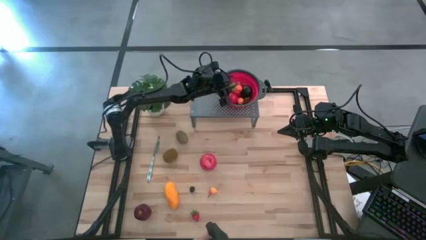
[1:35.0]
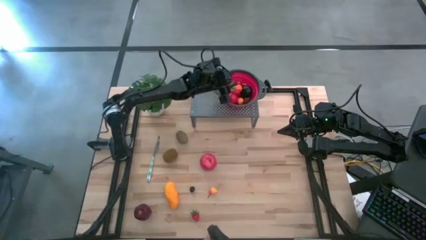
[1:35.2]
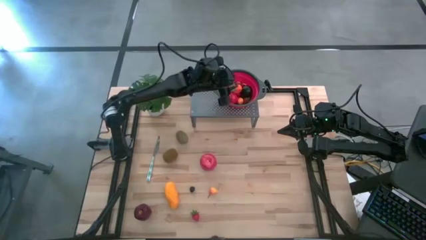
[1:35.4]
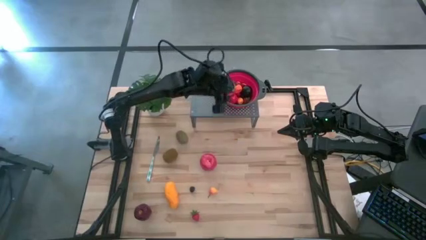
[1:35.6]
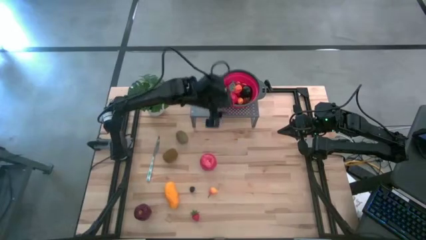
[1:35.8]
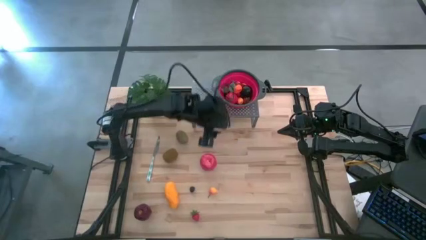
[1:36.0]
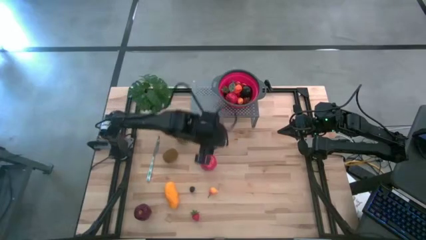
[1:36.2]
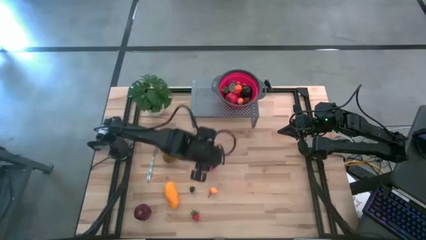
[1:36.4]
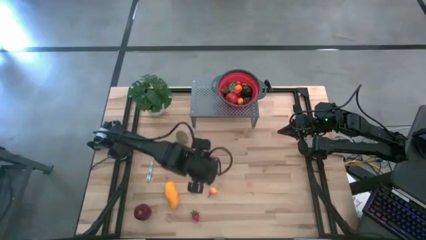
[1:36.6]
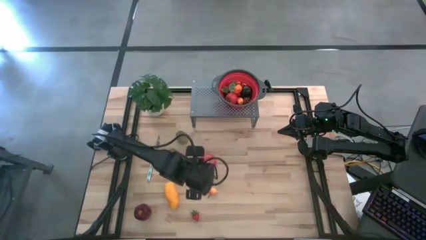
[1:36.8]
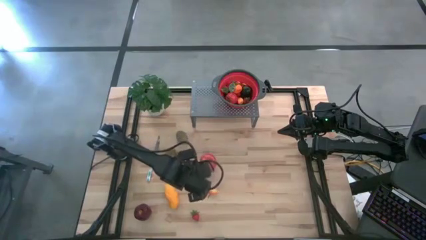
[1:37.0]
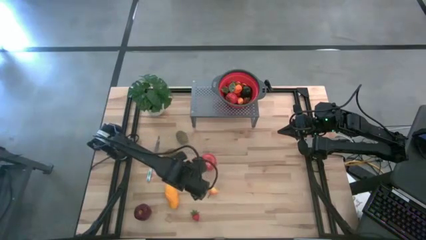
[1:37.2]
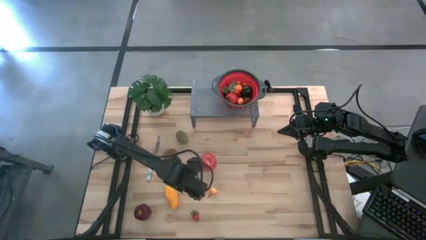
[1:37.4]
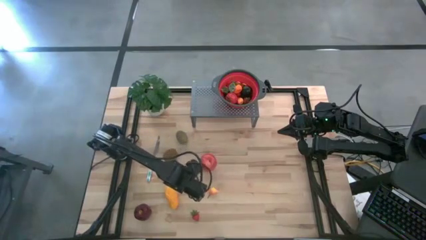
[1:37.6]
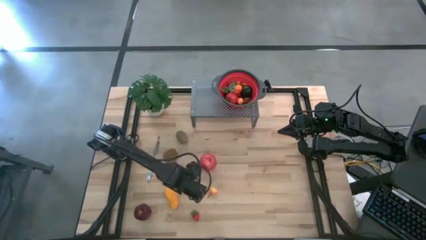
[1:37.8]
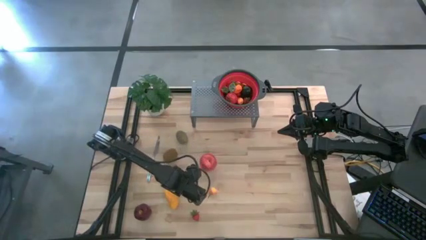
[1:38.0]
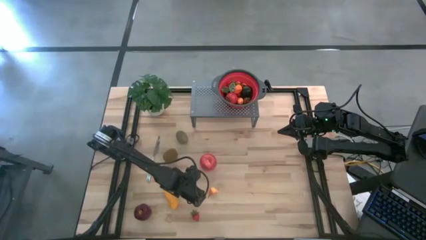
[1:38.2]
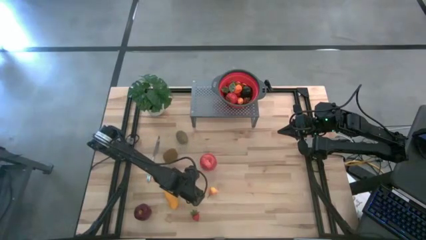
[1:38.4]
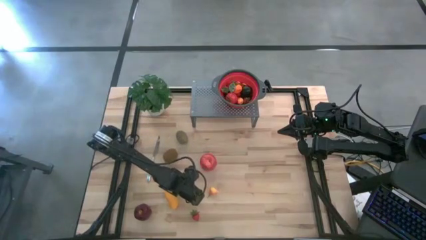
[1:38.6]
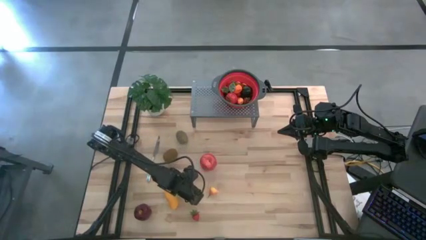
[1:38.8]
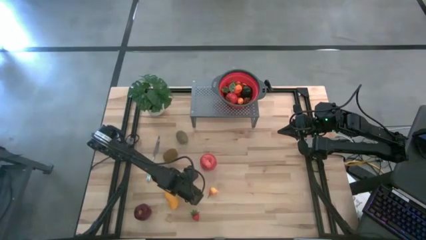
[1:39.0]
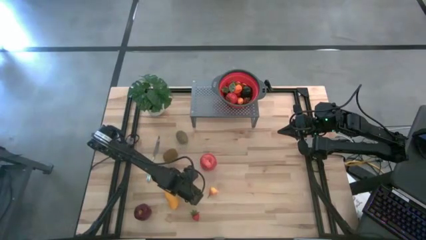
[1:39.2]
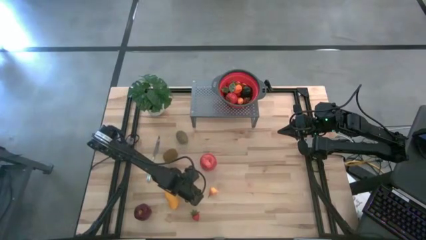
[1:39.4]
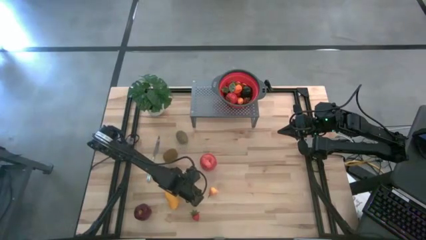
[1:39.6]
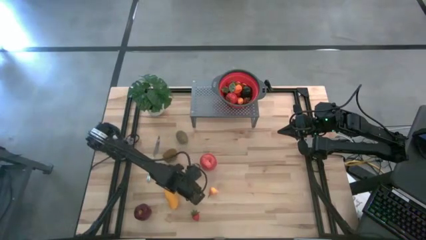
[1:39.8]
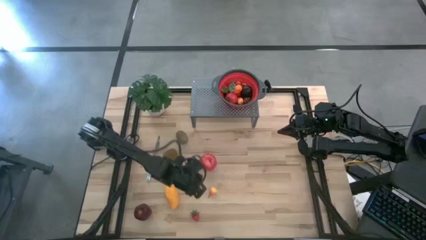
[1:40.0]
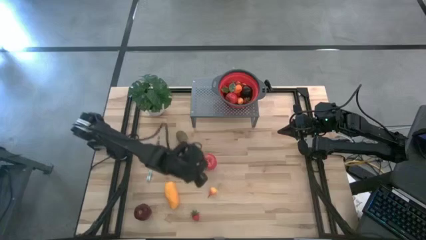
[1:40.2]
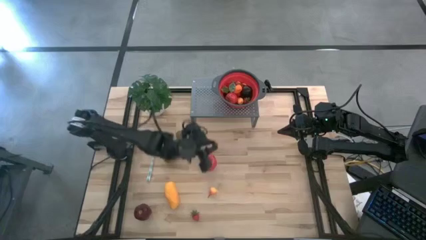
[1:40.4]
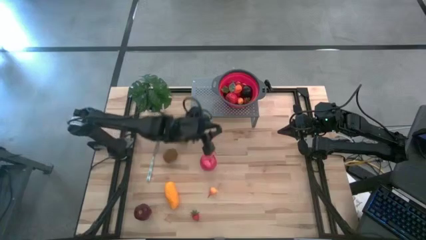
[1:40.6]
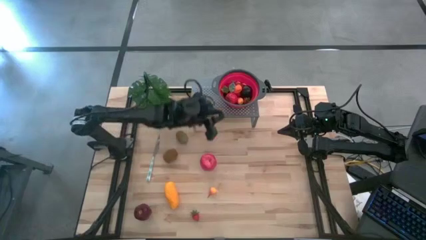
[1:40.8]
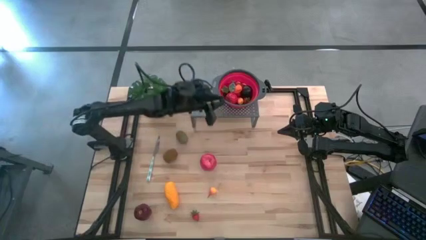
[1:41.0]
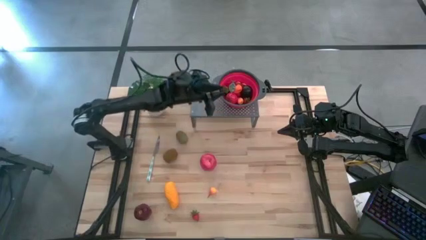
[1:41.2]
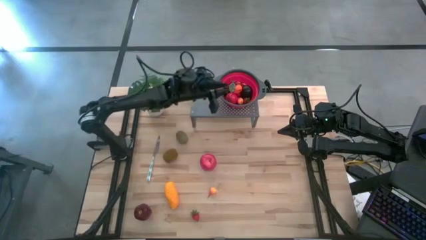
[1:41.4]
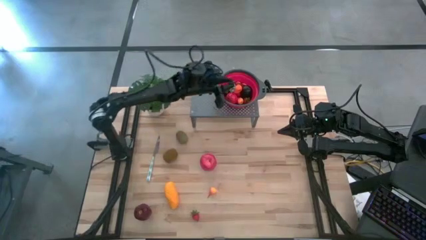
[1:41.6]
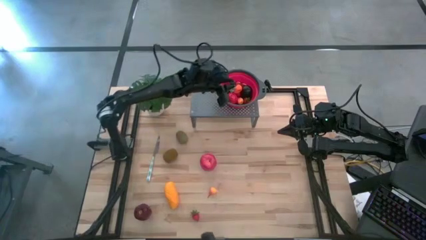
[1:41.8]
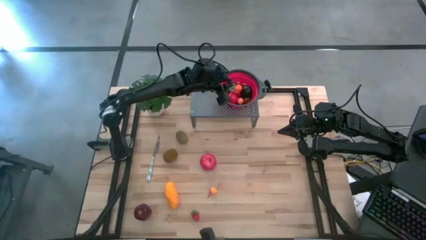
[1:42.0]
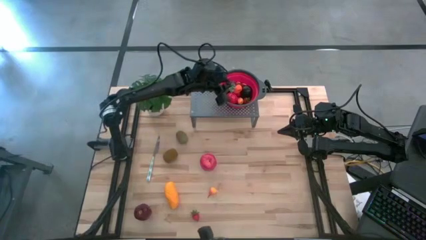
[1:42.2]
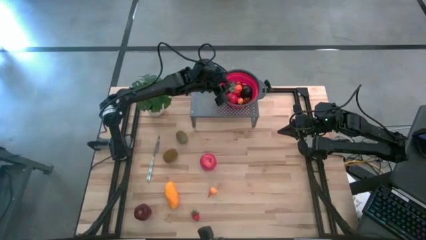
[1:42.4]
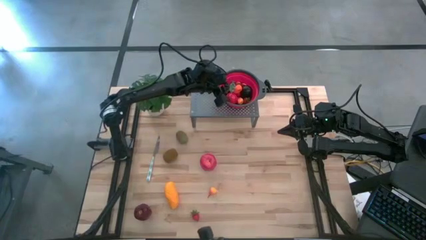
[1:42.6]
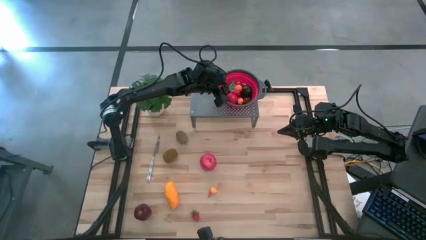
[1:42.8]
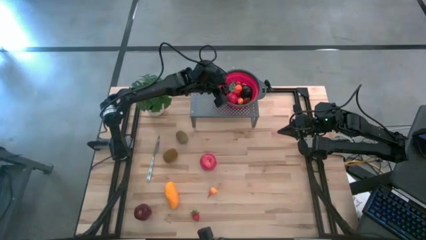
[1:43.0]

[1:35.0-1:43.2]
Task: Pick & Place Fruit
Put the black blackberry into the strainer bowl on the shelf

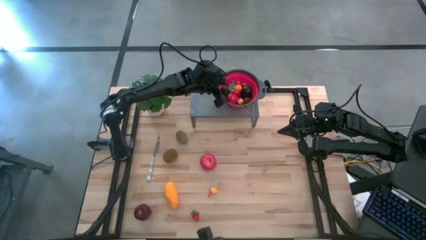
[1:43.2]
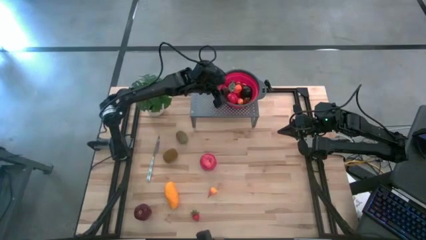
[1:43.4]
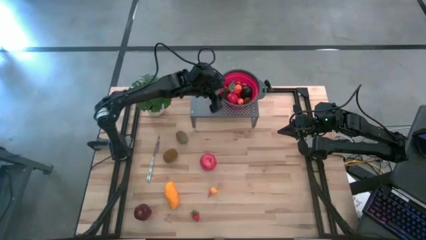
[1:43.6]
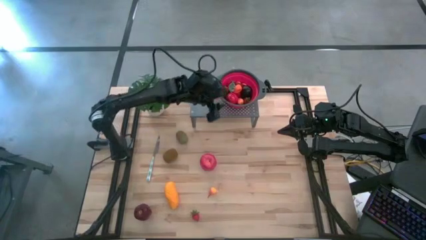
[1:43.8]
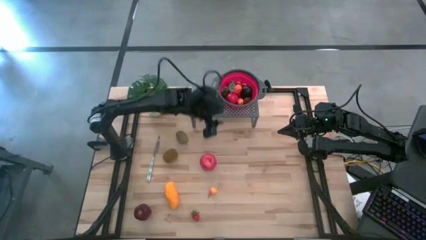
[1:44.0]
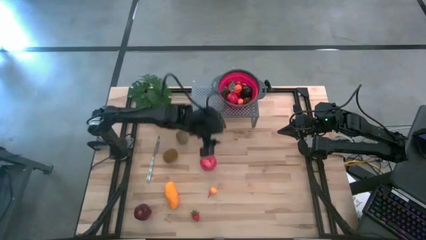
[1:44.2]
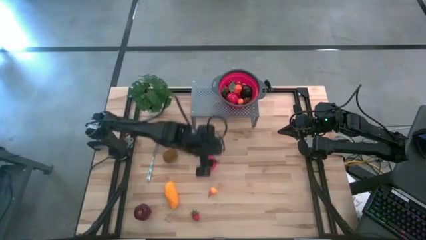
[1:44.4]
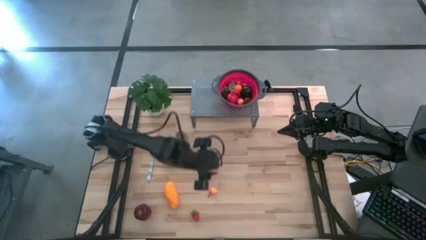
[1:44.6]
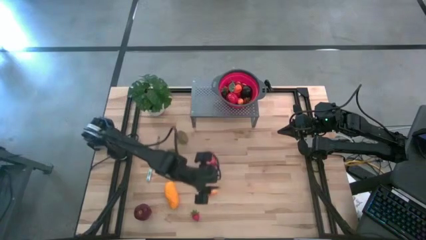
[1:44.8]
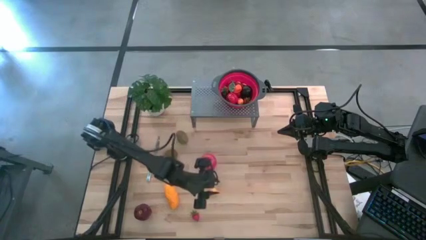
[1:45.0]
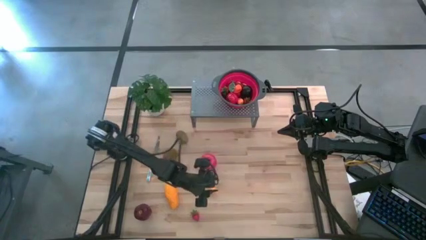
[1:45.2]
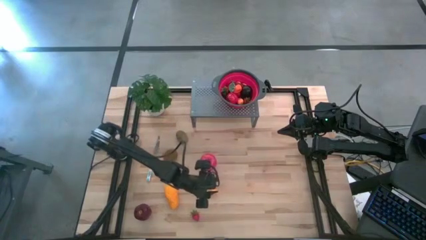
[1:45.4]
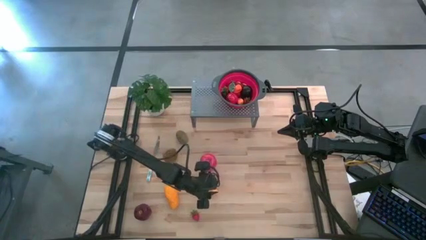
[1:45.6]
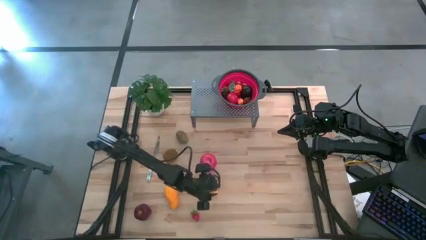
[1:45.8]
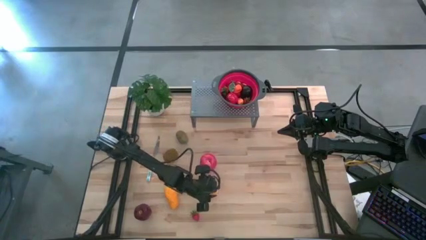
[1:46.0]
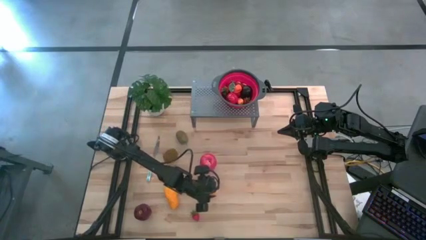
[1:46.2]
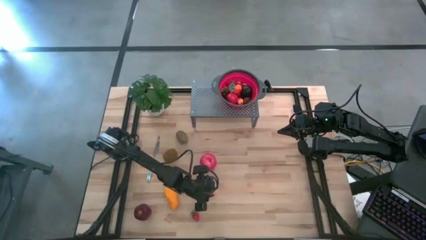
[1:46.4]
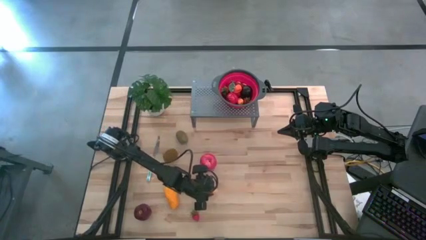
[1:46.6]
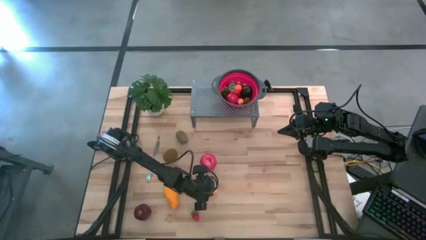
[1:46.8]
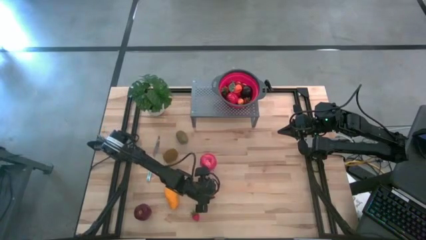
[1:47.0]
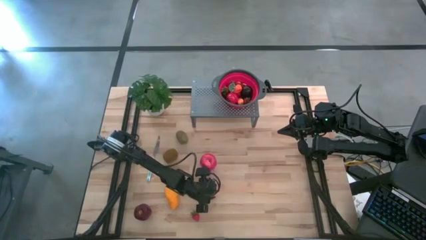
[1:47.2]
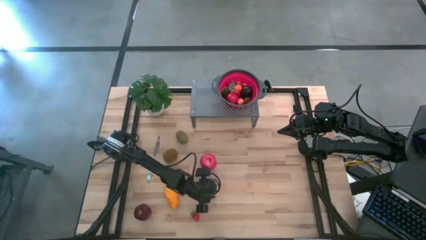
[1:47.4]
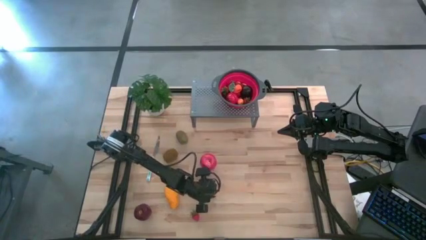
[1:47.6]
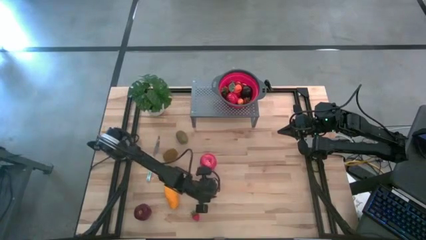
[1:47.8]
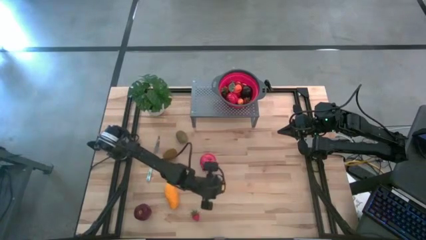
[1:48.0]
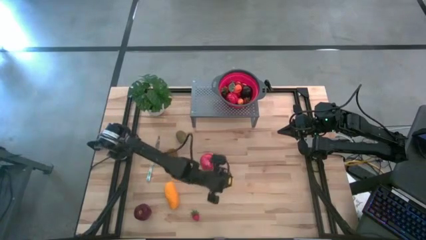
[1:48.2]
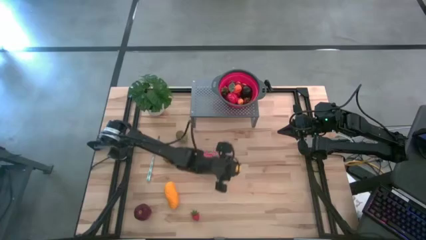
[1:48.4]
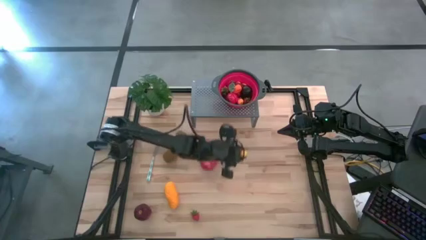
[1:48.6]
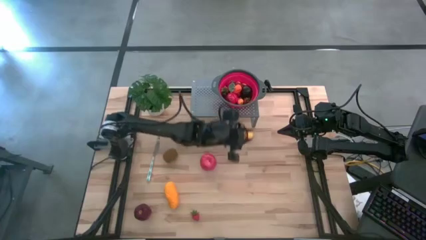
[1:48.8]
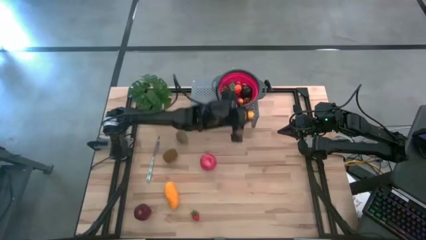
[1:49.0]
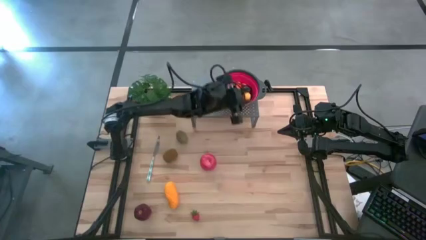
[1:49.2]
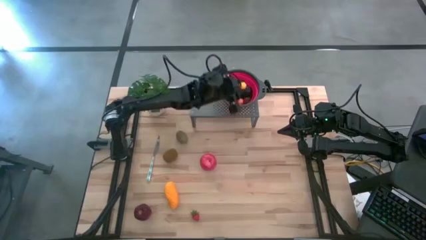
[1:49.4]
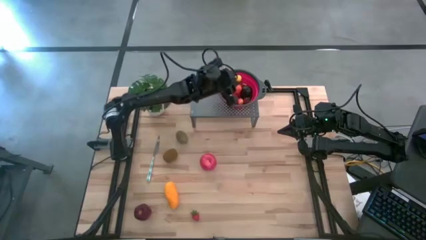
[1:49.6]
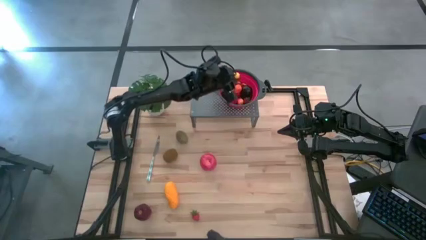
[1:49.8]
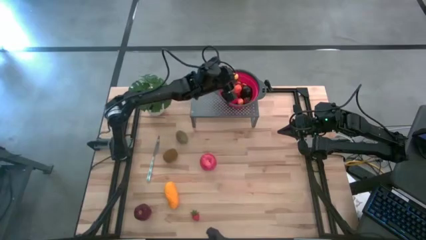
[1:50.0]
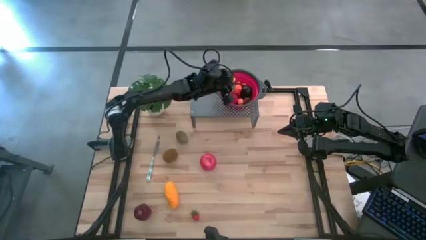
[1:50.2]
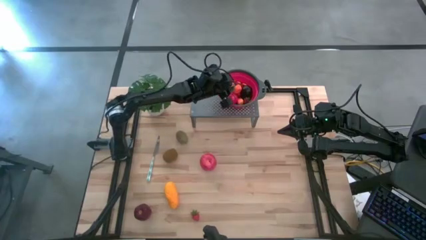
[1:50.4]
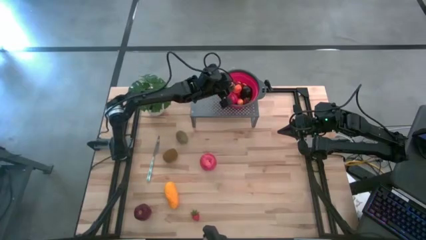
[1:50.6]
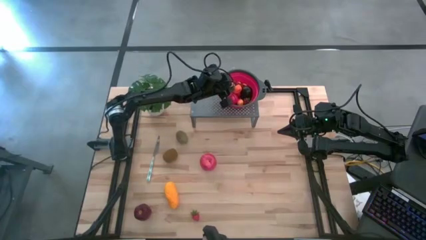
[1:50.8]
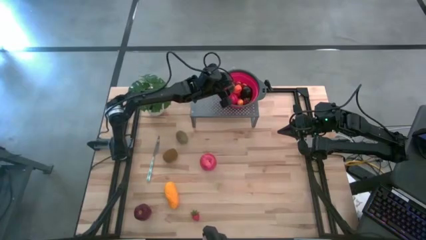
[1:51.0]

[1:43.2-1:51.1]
Put the peach into the strainer bowl on the shelf
